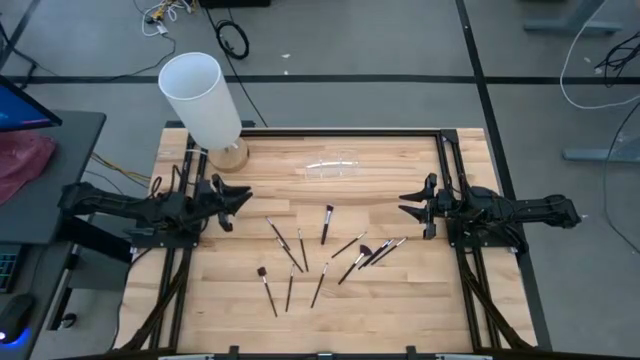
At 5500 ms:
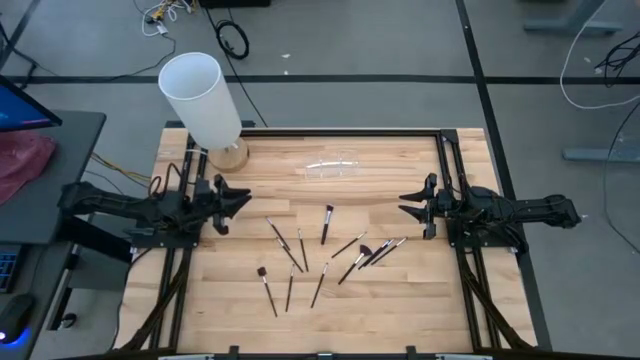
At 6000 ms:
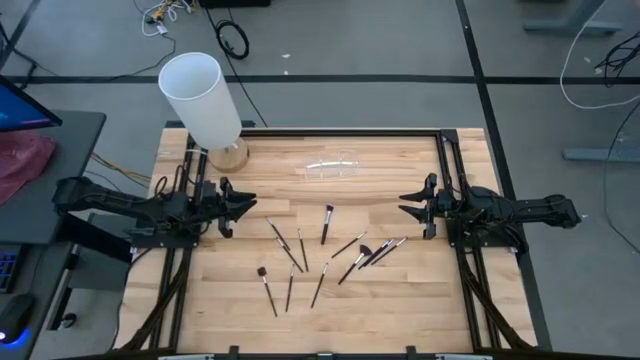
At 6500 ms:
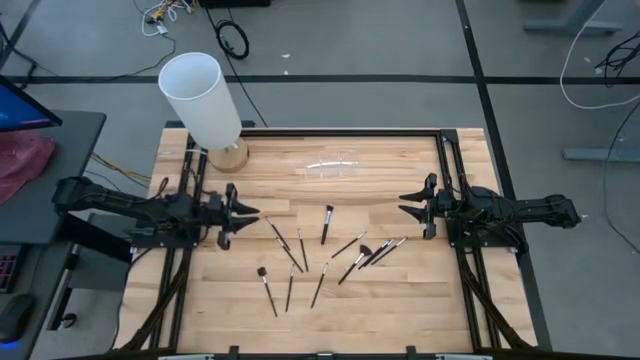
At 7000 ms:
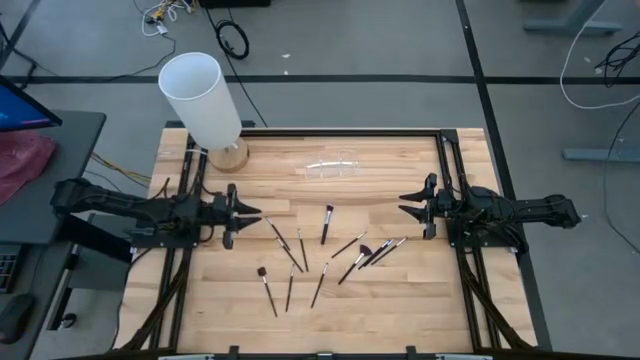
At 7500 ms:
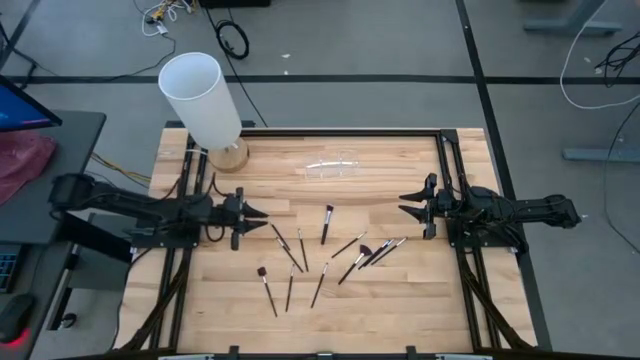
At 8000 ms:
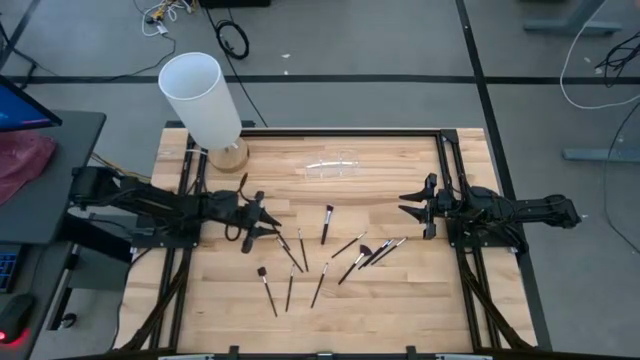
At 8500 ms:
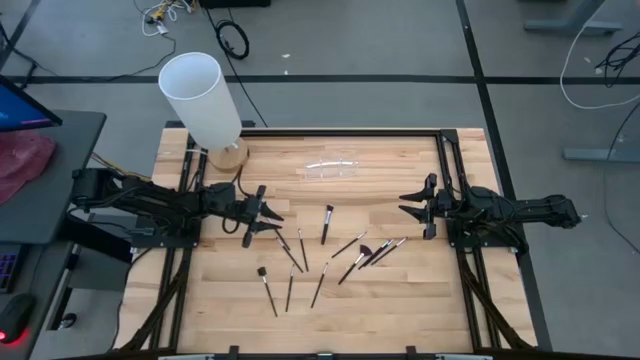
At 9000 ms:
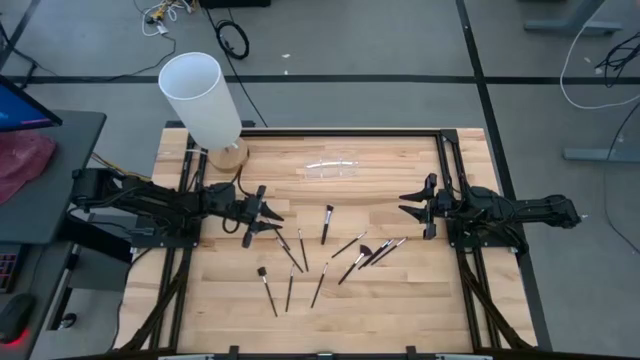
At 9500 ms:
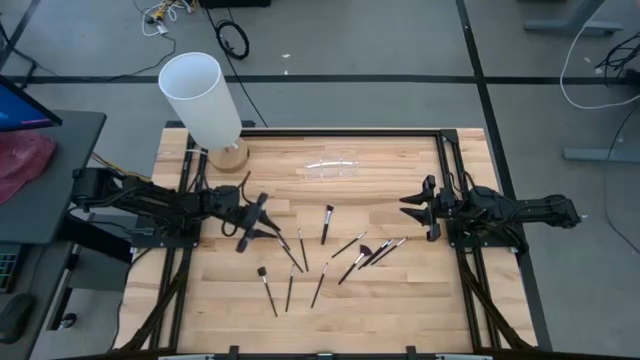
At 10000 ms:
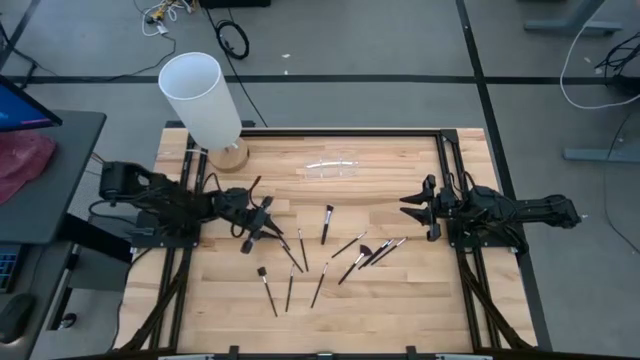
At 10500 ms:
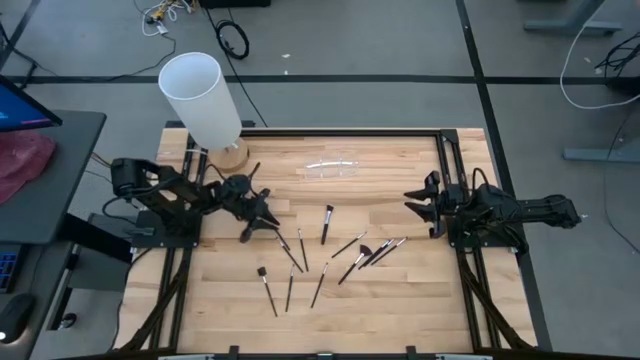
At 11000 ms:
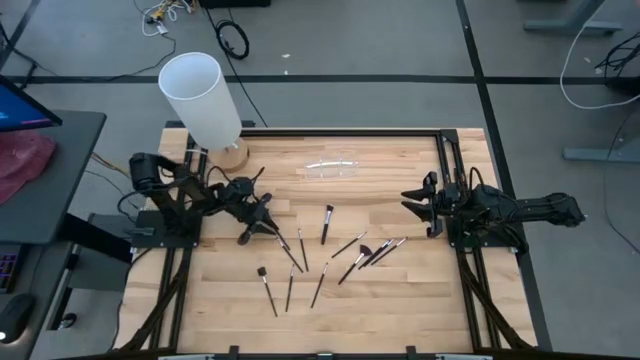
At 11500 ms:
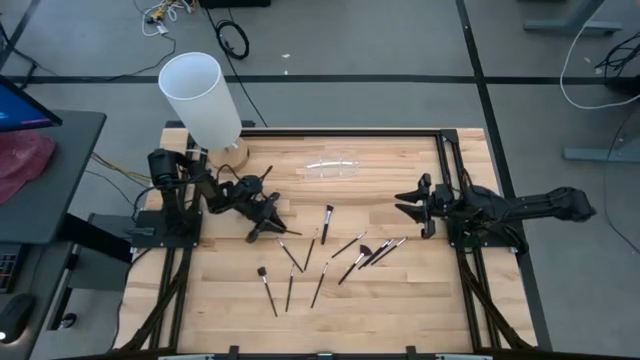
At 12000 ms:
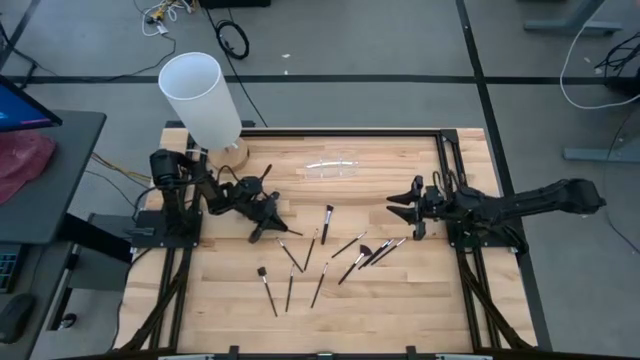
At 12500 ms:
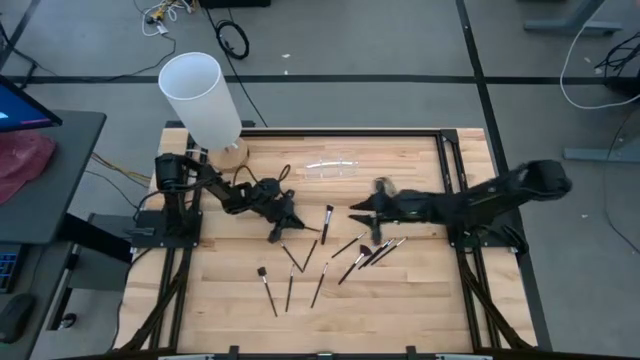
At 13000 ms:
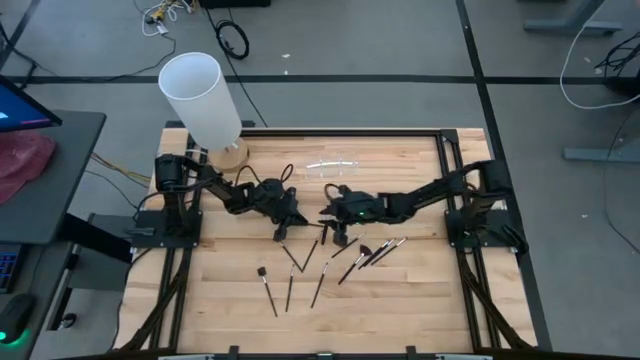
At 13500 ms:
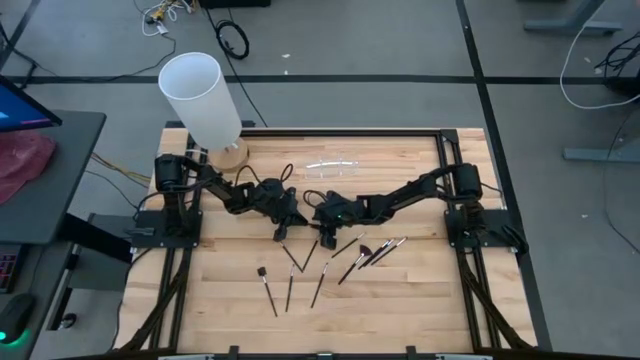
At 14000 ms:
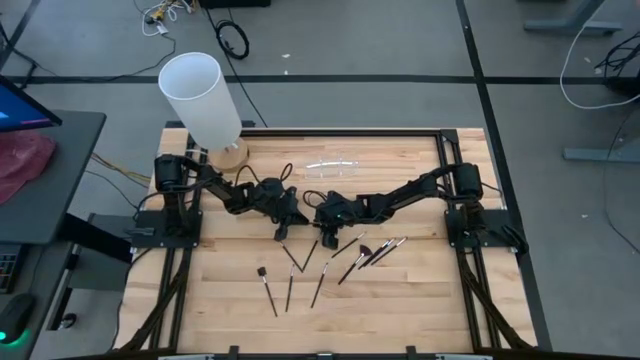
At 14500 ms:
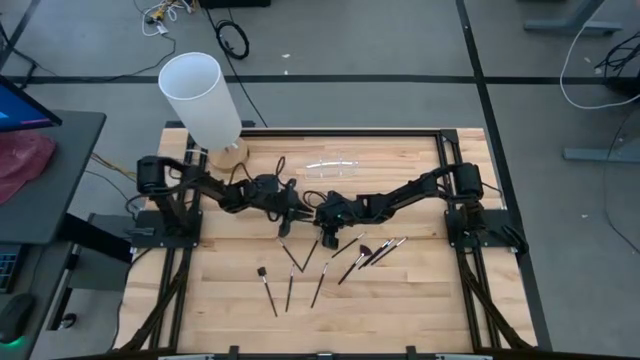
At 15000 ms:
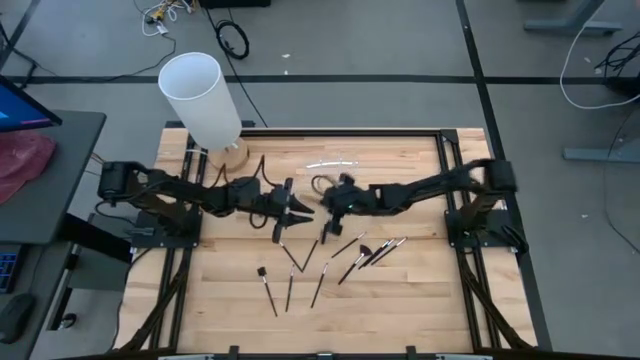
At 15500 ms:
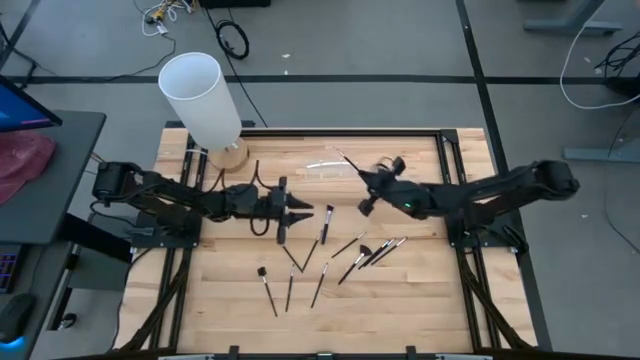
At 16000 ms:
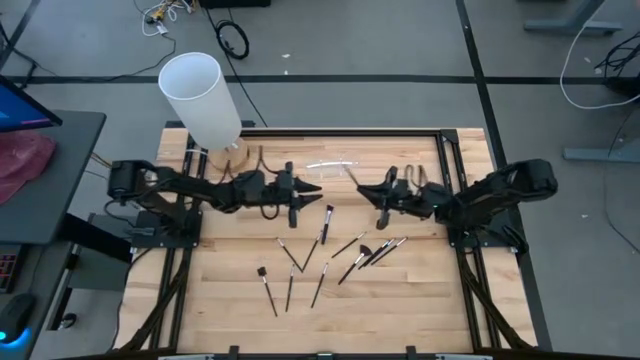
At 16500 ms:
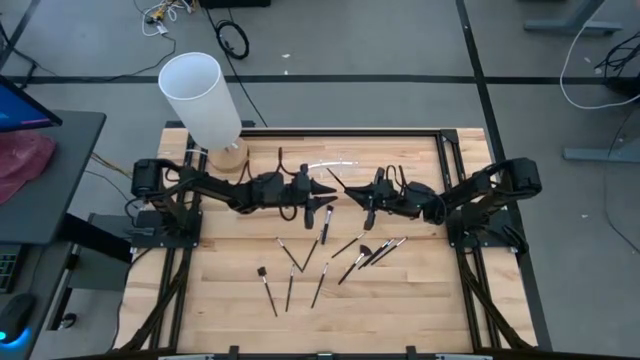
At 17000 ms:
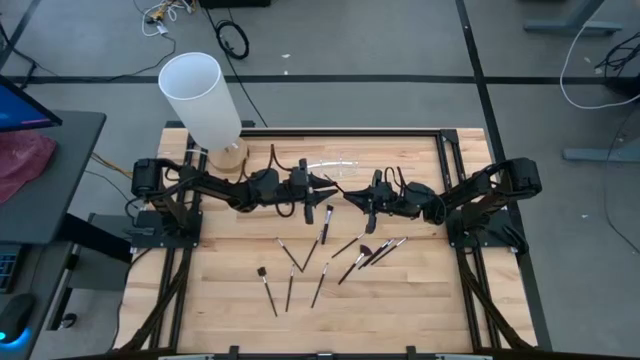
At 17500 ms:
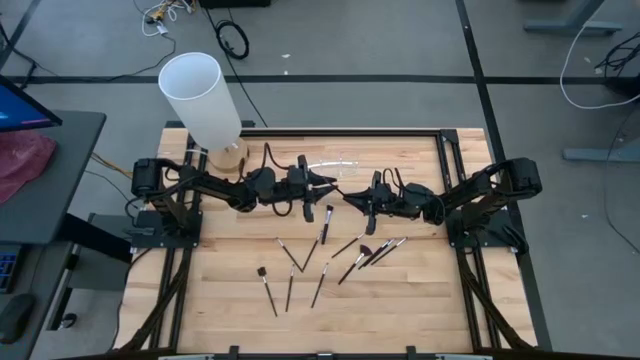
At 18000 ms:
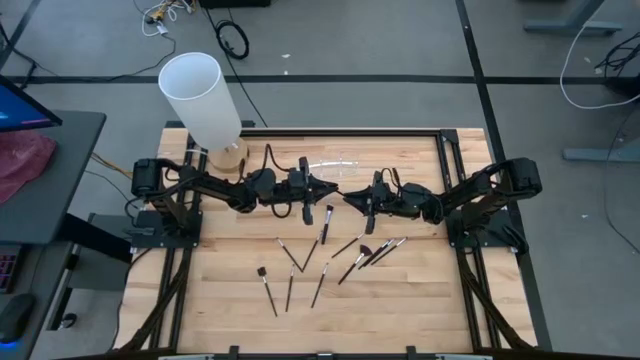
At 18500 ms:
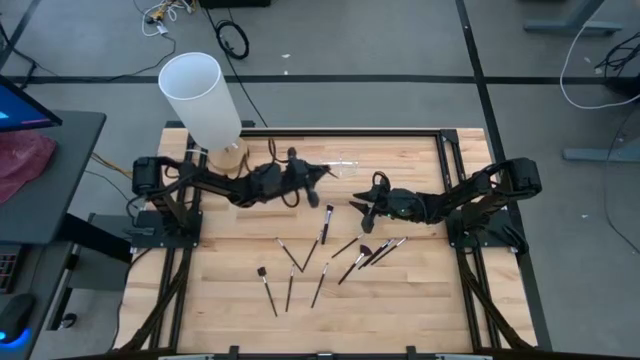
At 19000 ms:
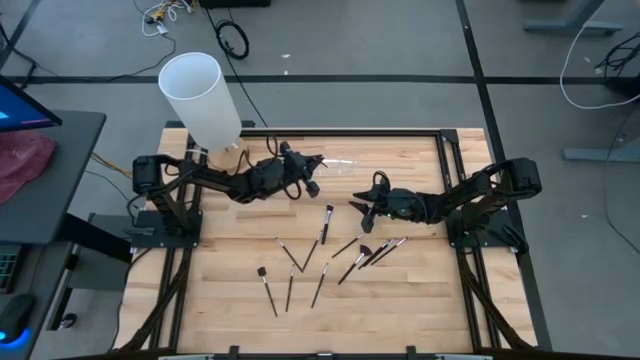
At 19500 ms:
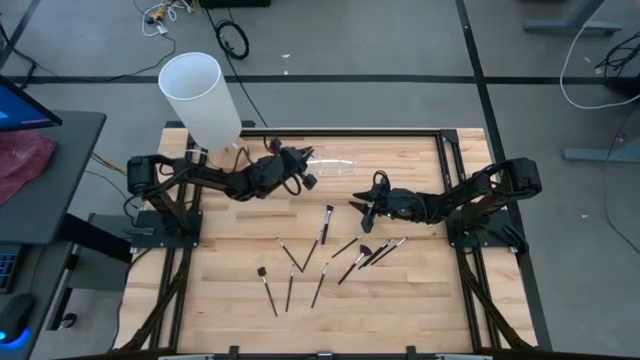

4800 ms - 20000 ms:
Task: Pick & Place Makeup Supplies
Put the makeup brush into the transparent organizer

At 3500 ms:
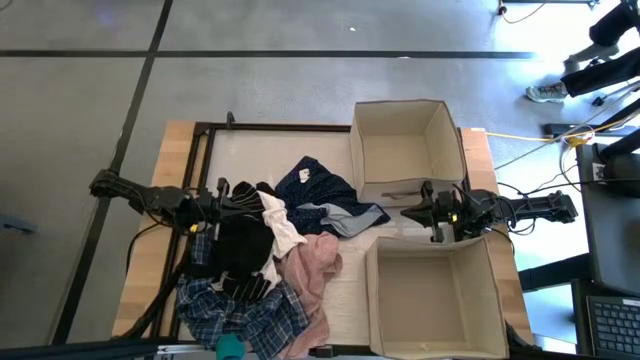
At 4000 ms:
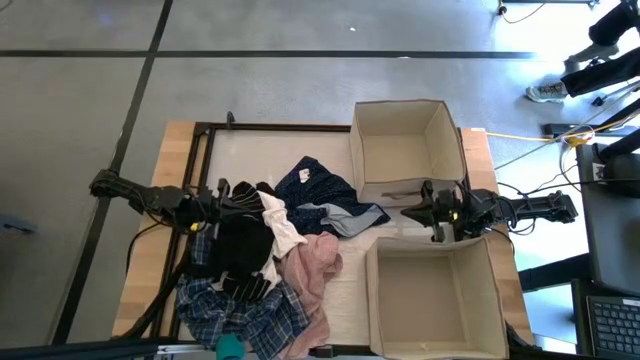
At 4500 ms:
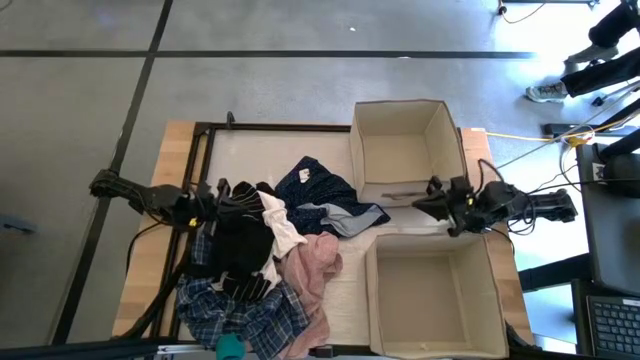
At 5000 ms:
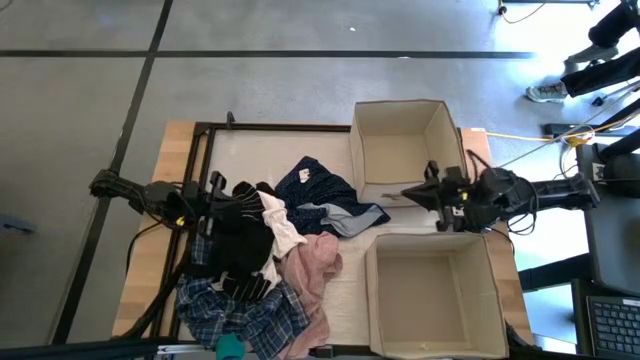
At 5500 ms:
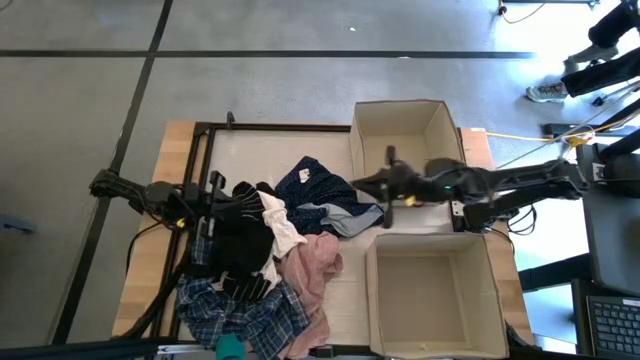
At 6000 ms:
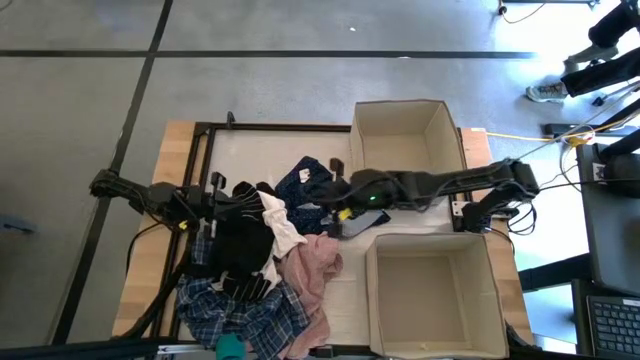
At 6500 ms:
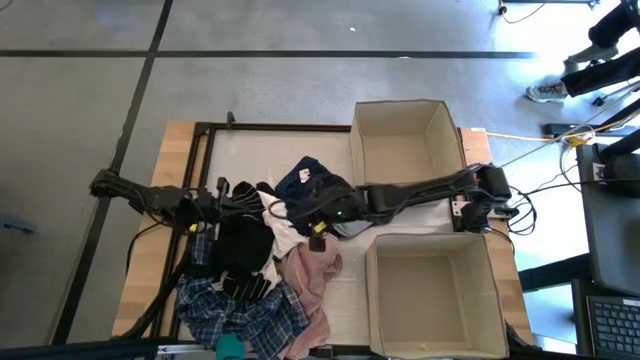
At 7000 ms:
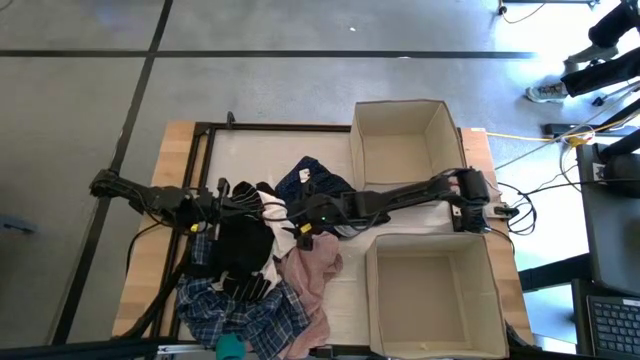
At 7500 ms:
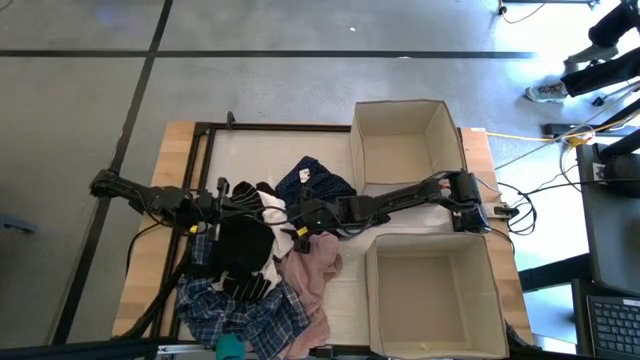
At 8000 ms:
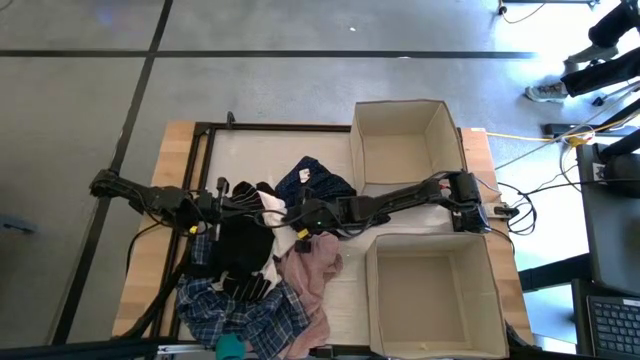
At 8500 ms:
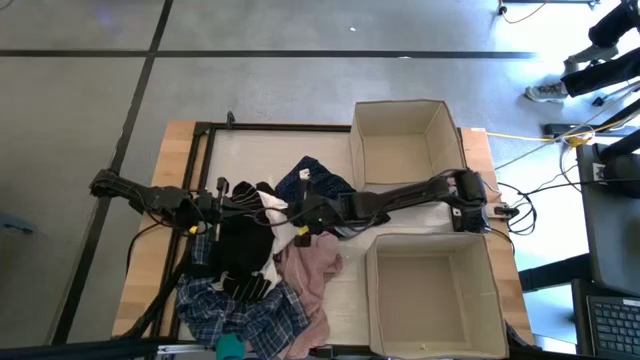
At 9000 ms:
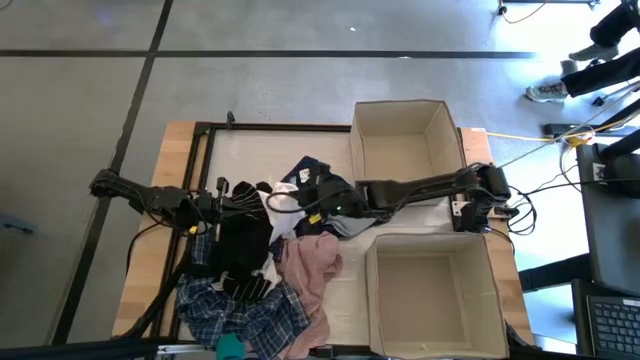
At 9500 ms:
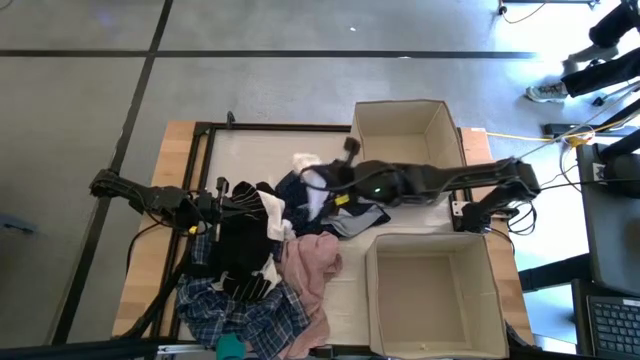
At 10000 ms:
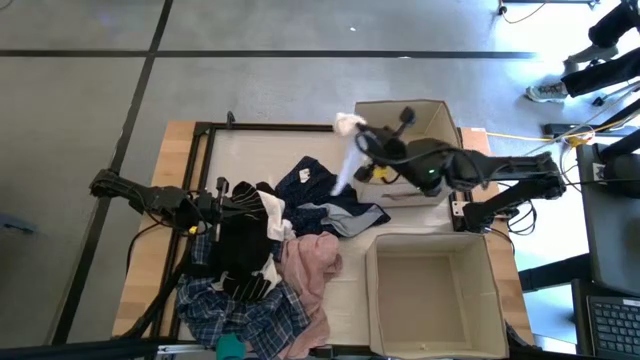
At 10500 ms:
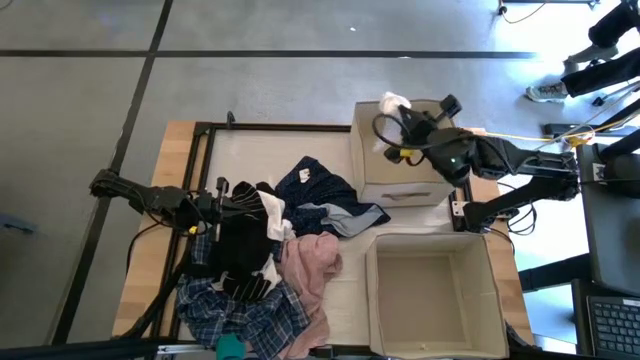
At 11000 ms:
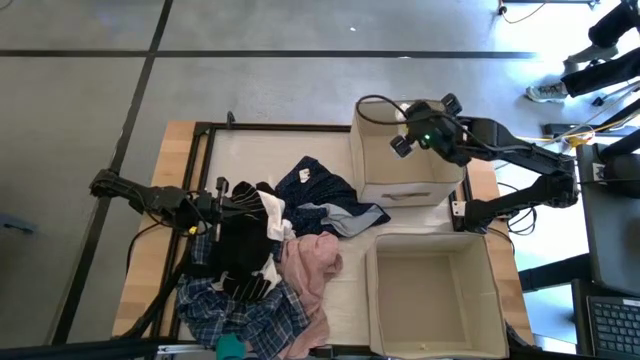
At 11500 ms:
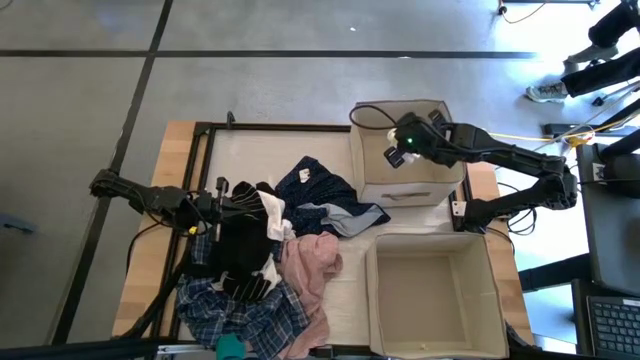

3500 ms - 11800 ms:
Task: Sort clothes
Put the white sock into the top laundry organizer
